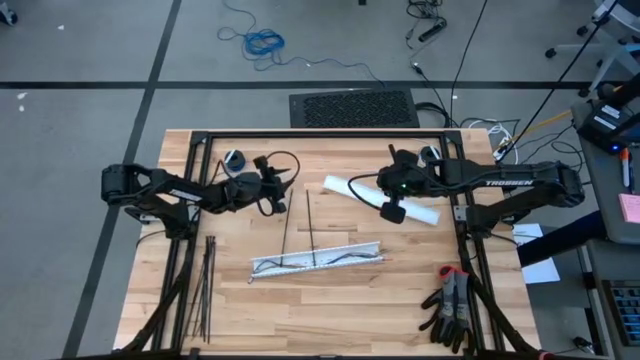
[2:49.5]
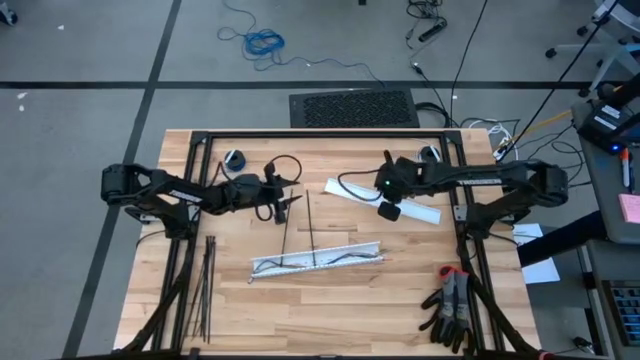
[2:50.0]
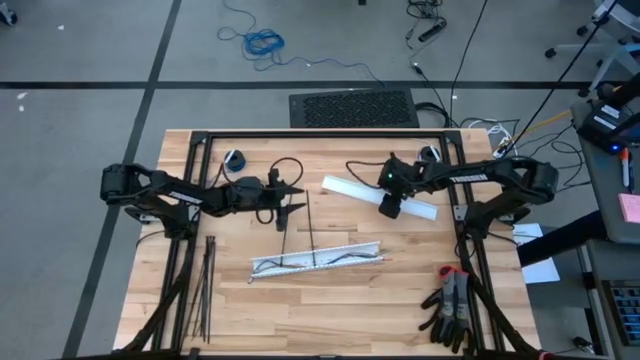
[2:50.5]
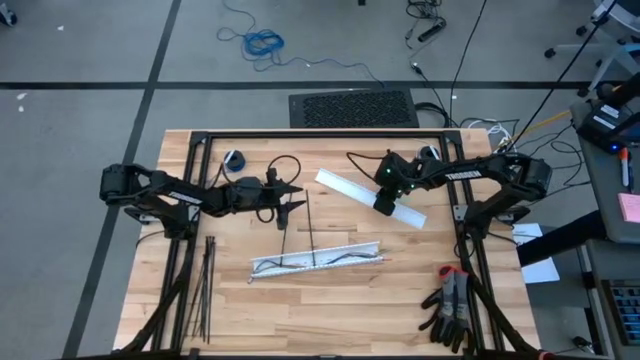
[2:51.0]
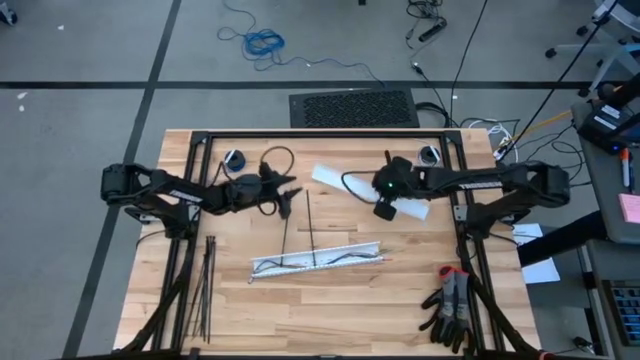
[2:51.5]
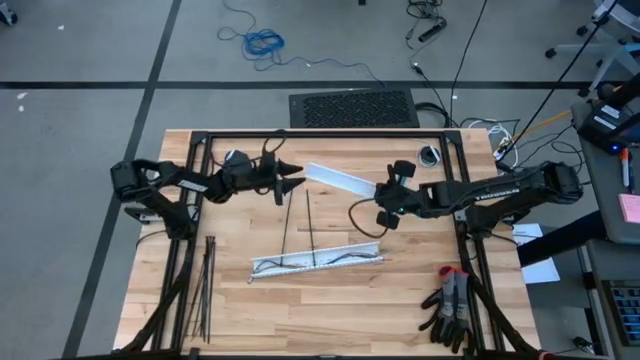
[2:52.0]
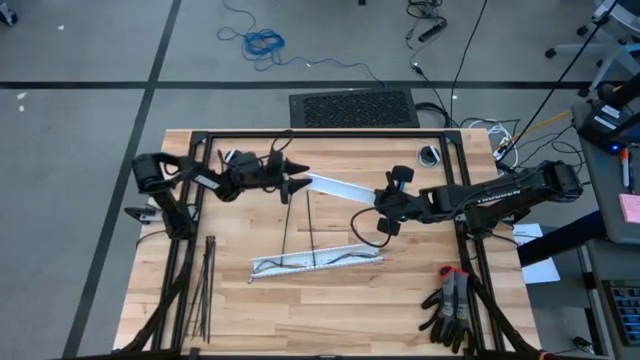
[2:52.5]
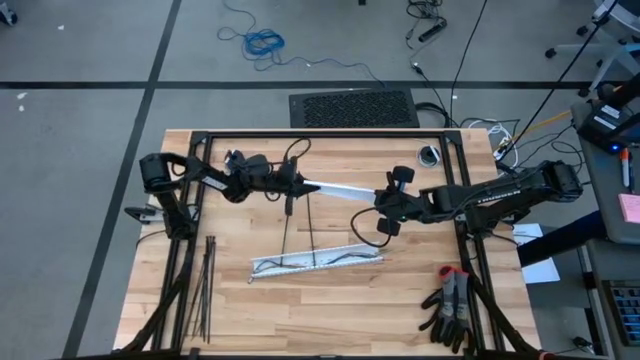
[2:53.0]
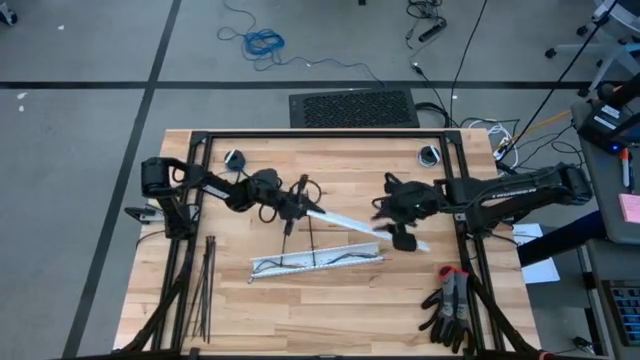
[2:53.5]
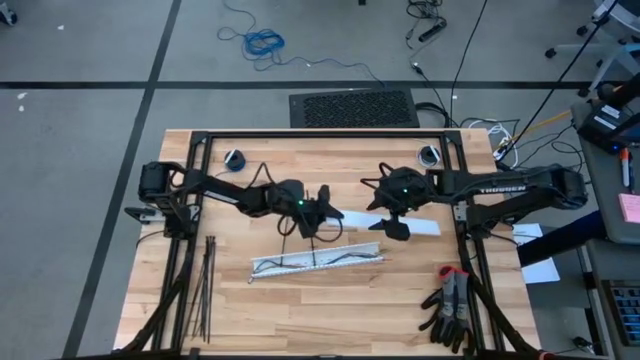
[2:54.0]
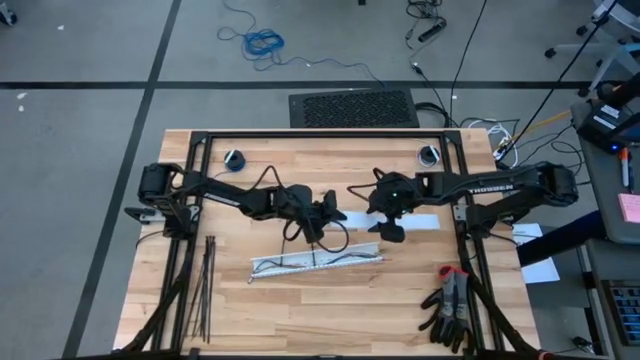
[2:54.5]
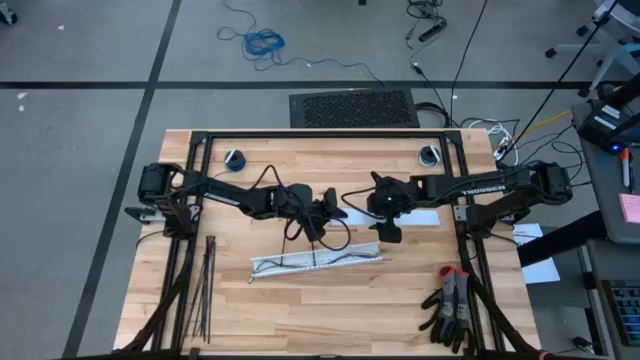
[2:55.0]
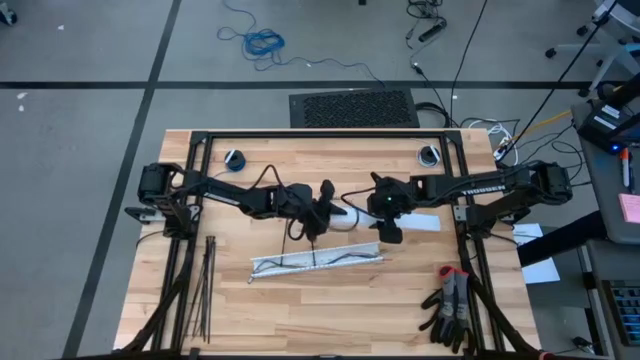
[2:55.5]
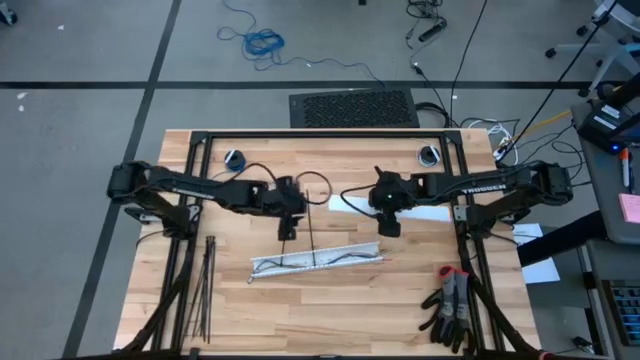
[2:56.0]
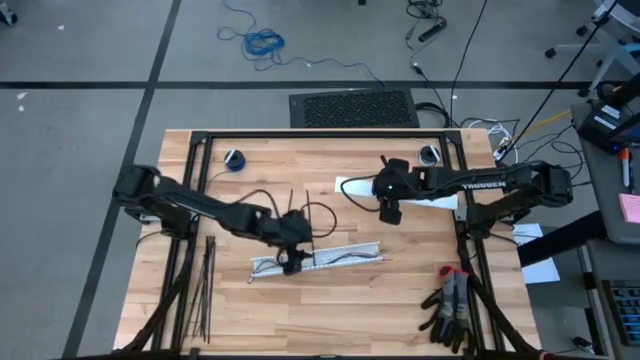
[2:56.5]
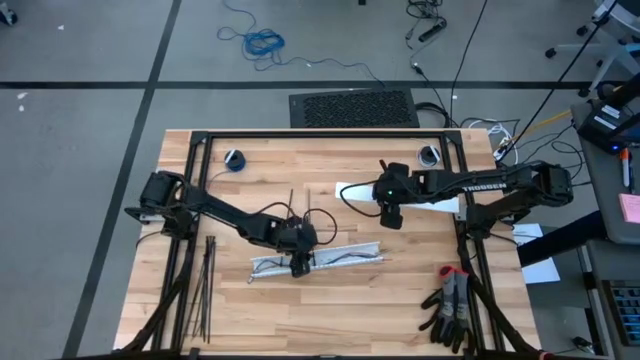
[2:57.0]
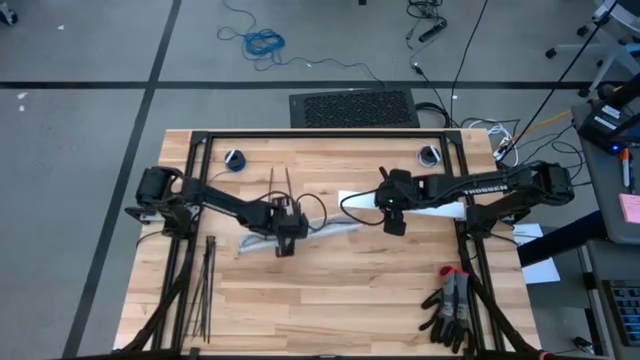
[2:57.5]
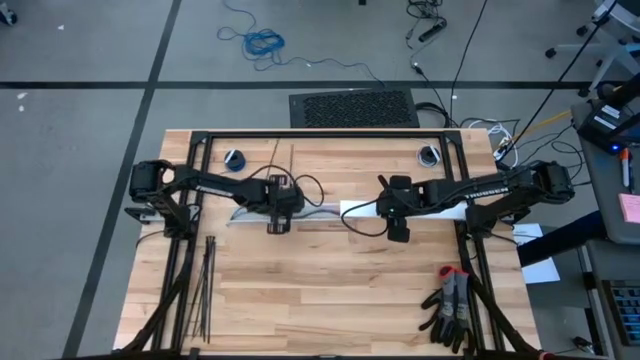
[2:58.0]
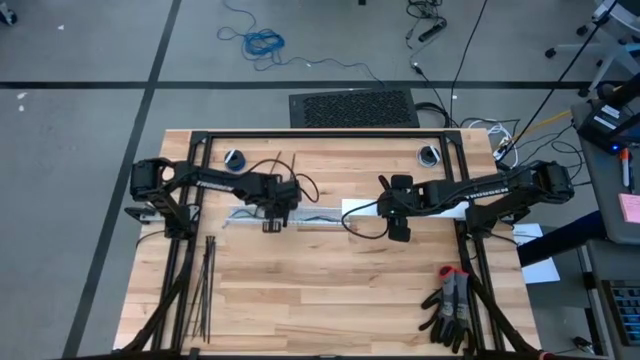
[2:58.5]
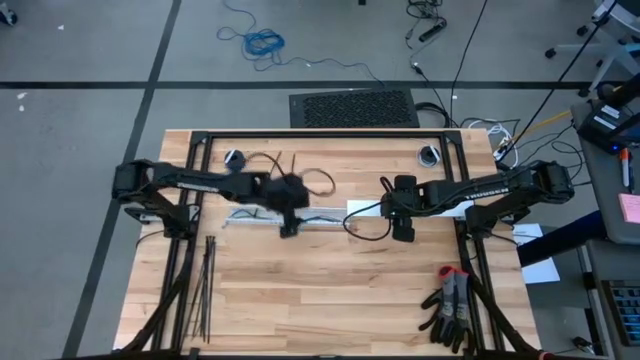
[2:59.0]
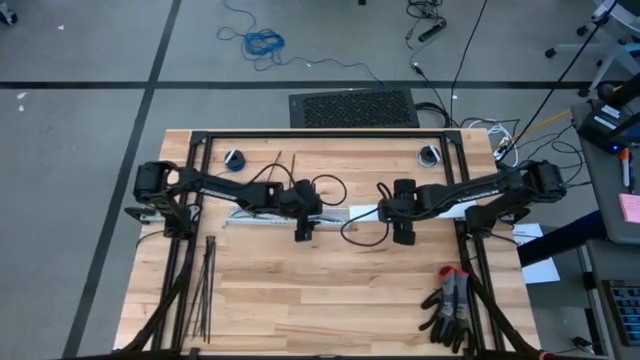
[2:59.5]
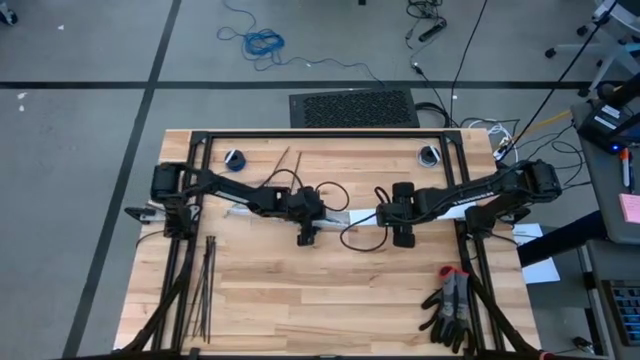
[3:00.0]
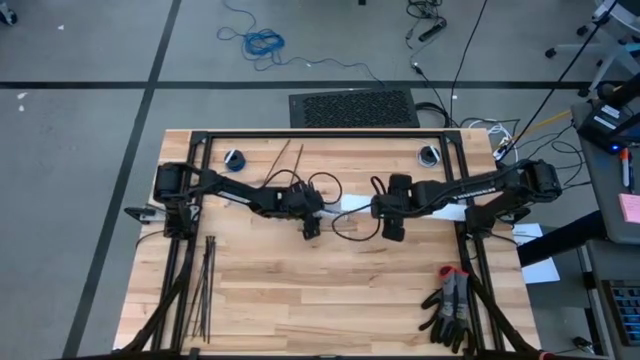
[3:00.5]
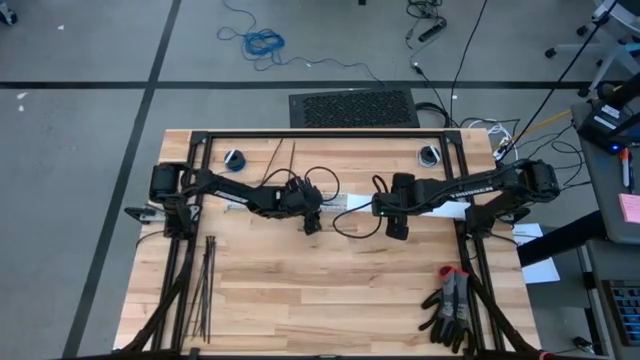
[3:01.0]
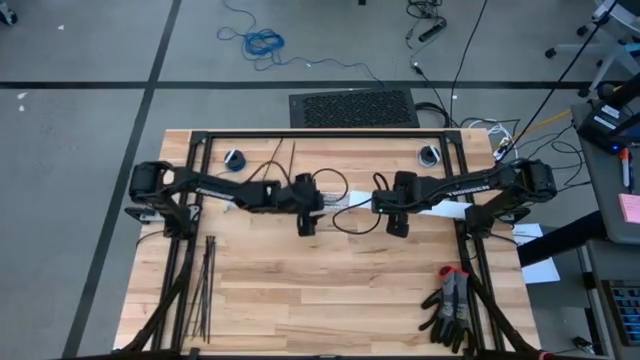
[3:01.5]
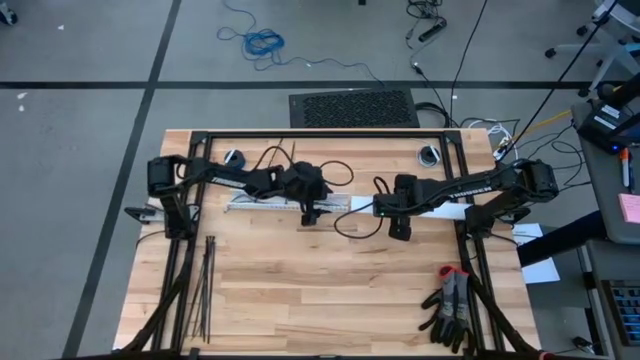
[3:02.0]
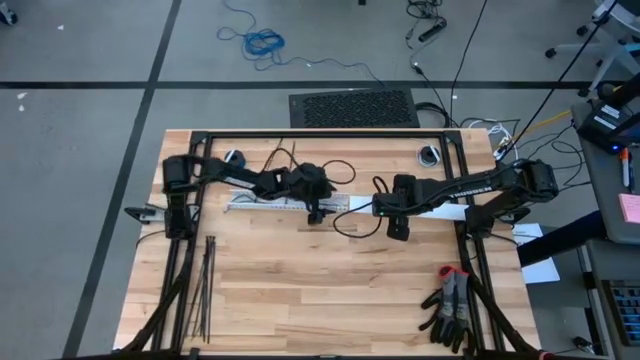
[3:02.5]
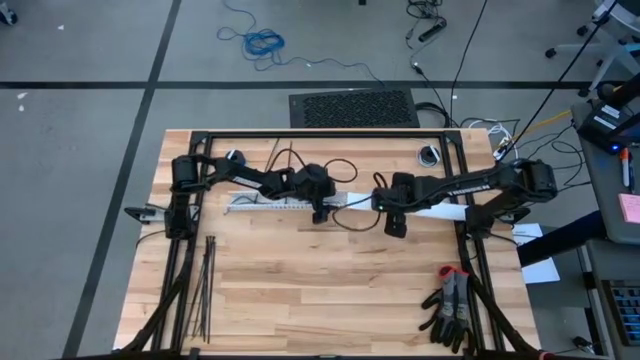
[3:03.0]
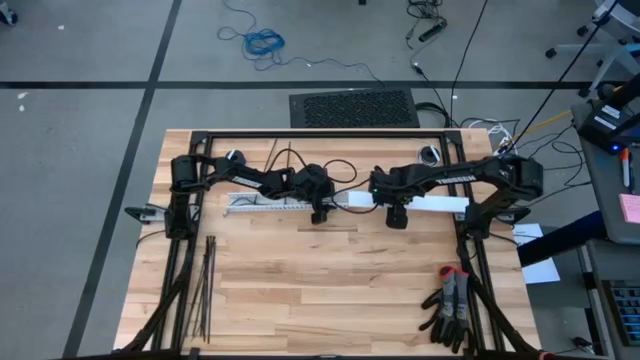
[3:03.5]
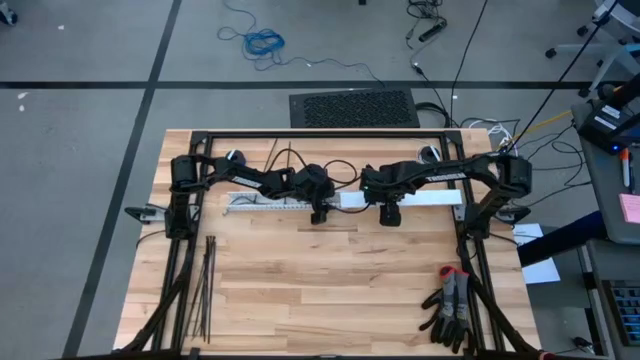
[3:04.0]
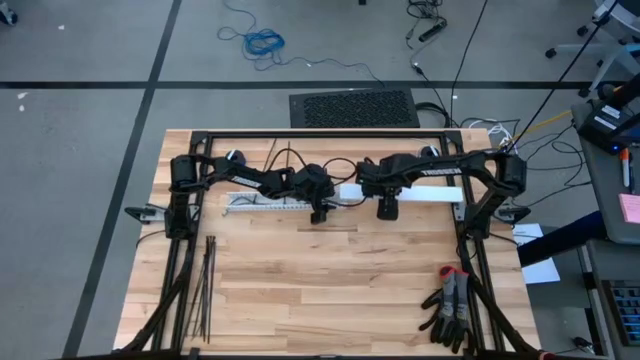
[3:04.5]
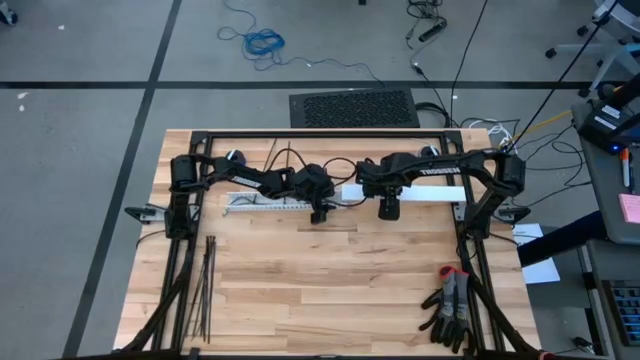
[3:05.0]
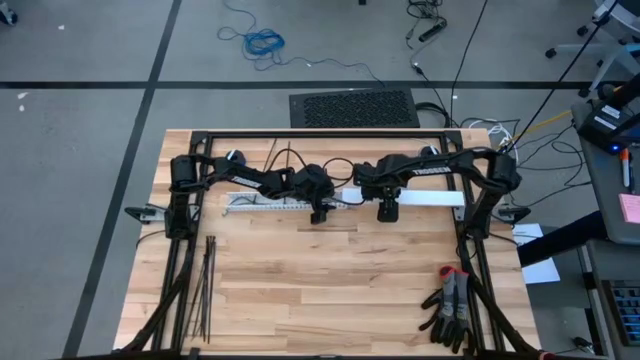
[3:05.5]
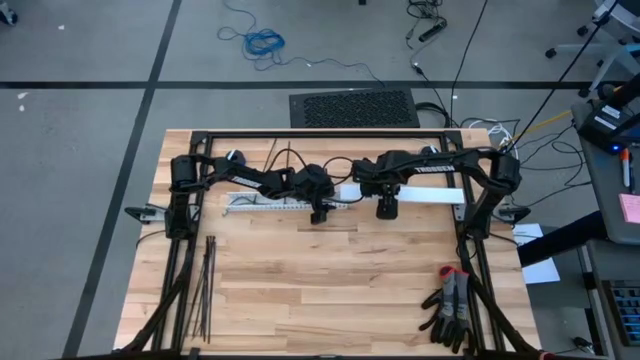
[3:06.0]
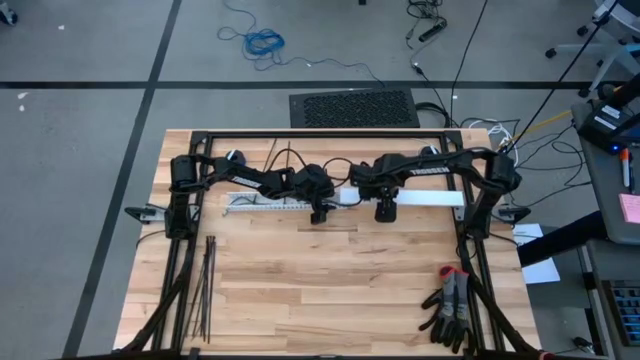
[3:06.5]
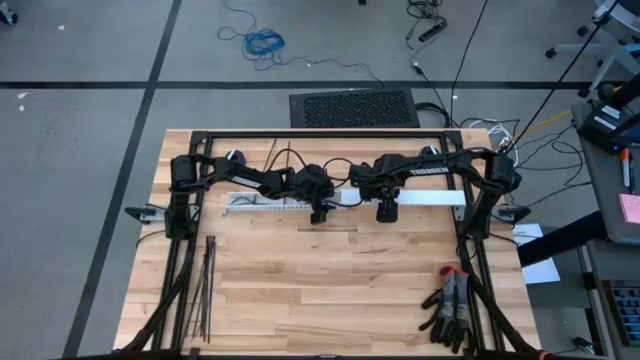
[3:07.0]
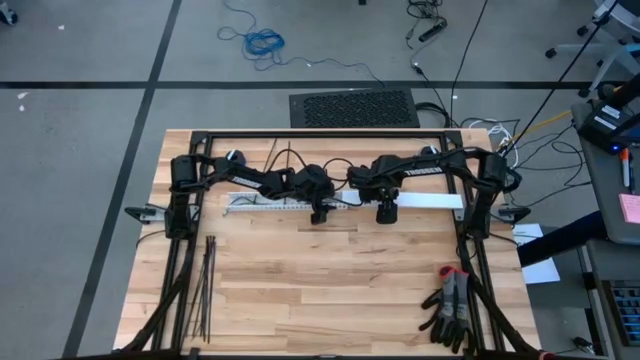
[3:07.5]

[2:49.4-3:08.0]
Task: Ziptie cables
Close the white cable duct

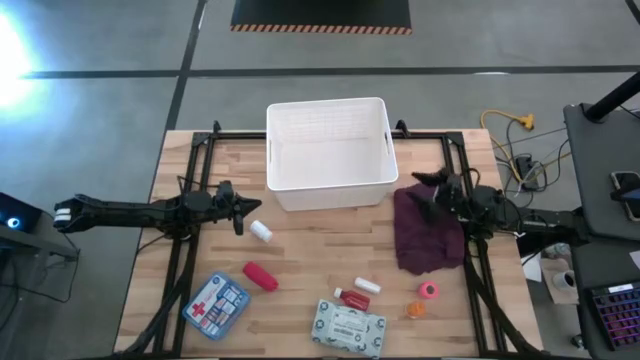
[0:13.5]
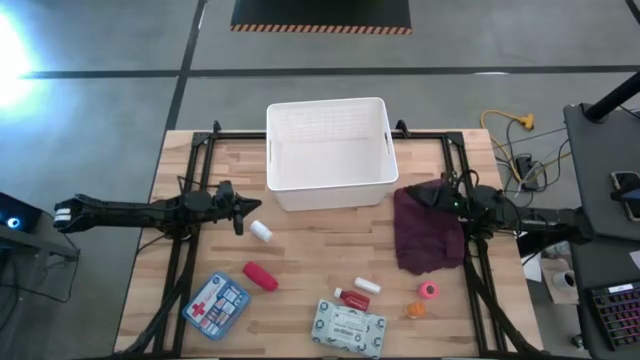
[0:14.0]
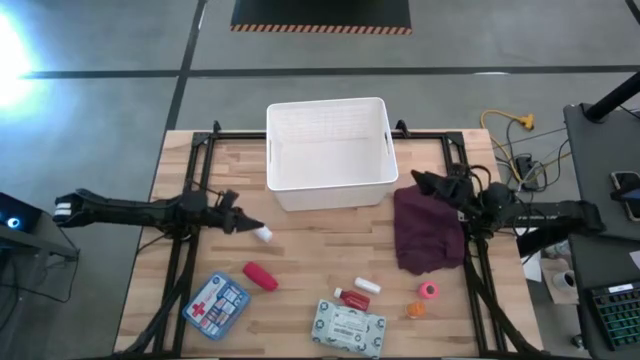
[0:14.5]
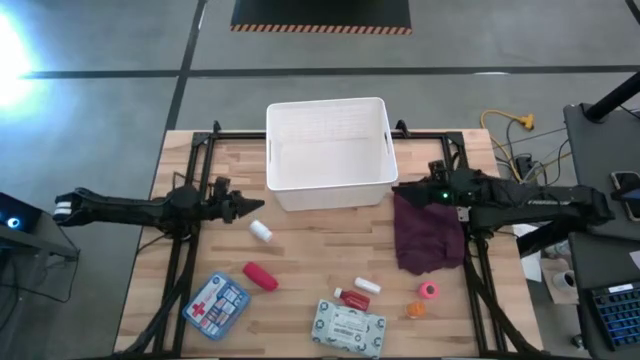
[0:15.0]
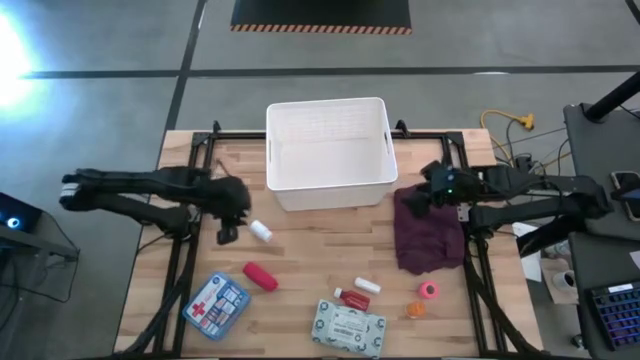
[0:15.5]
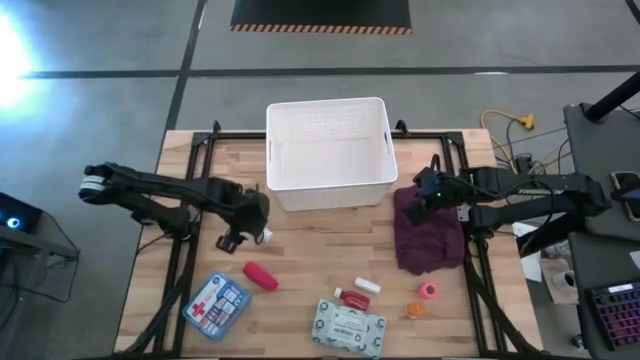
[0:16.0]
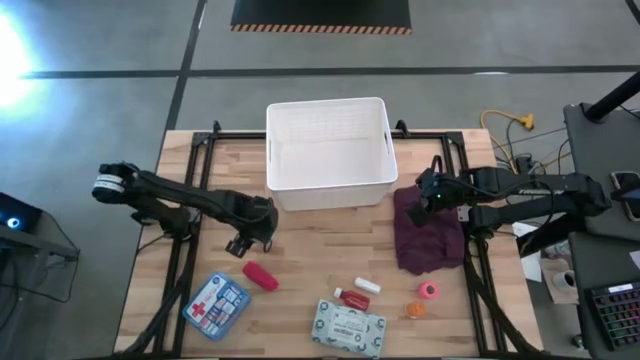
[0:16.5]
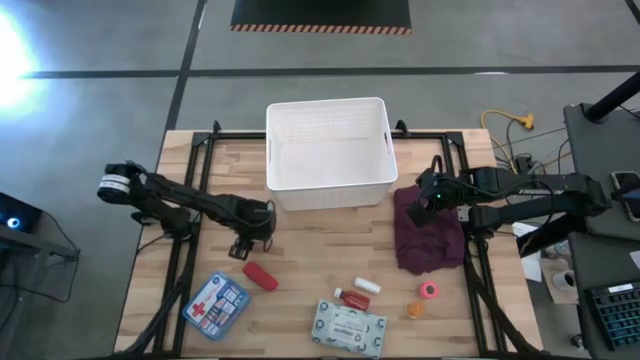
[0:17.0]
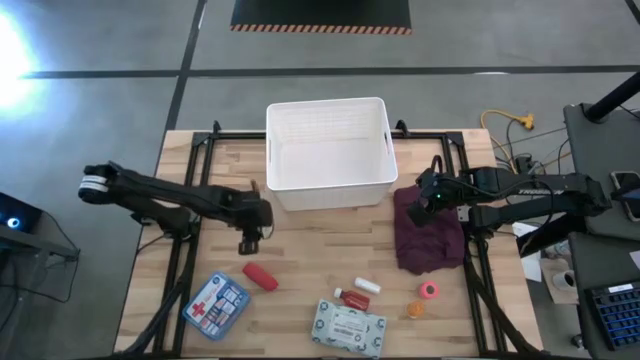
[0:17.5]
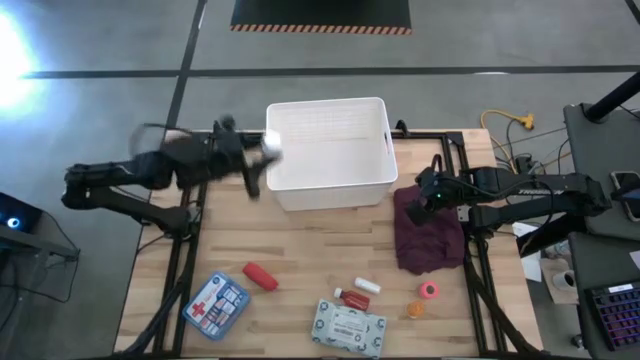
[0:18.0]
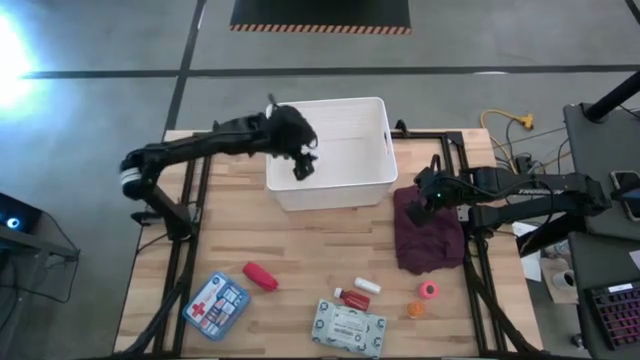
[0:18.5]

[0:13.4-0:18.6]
Task: Pick & place medical supplies in basket/bin
Put the white pill bottle into the white bin
